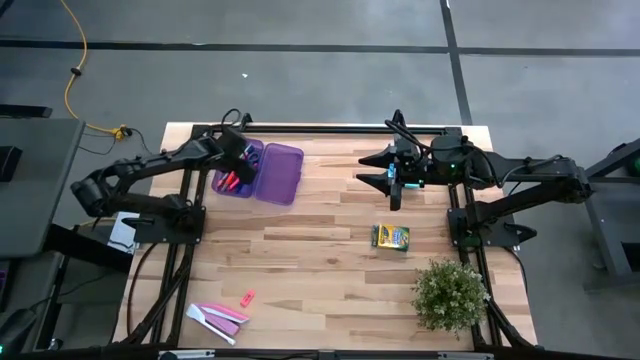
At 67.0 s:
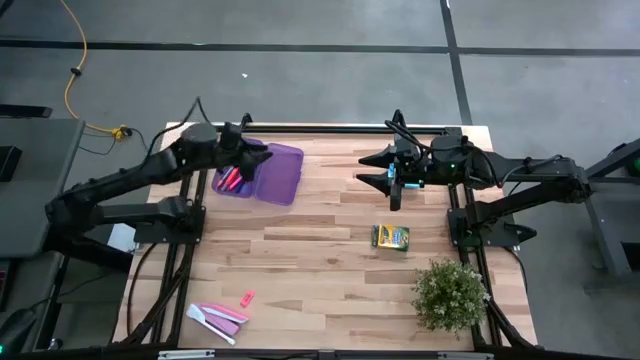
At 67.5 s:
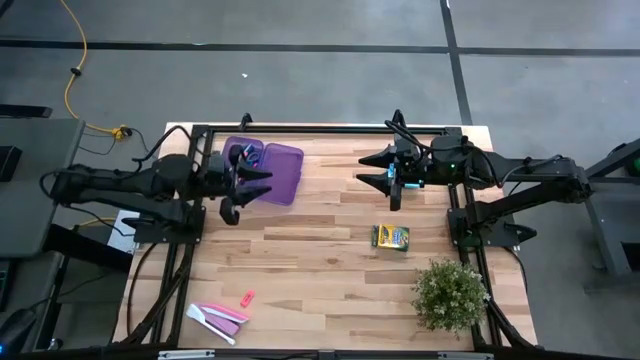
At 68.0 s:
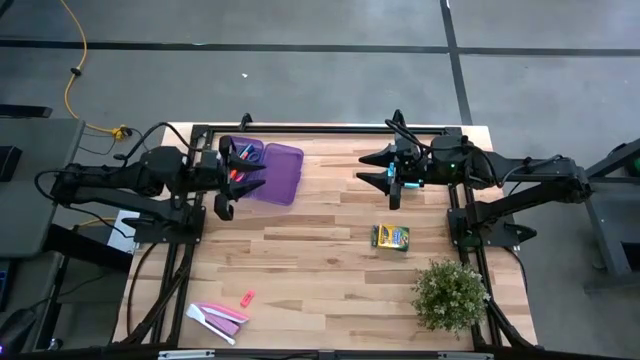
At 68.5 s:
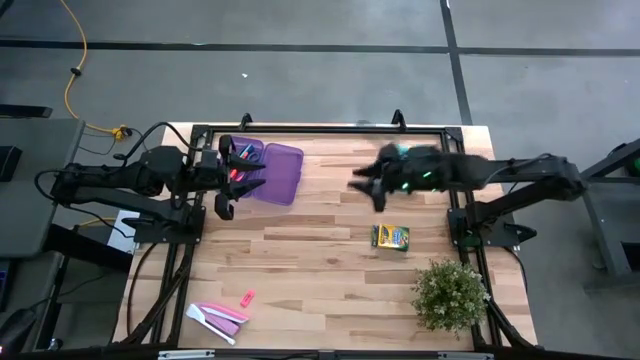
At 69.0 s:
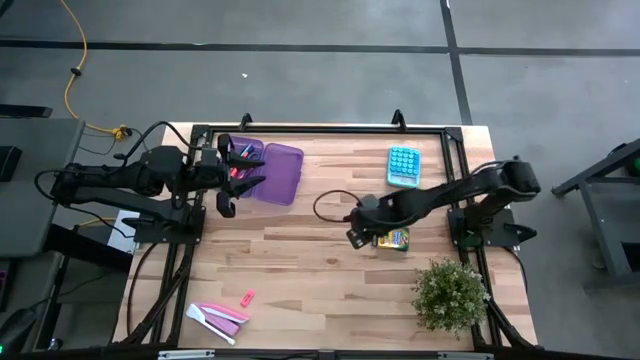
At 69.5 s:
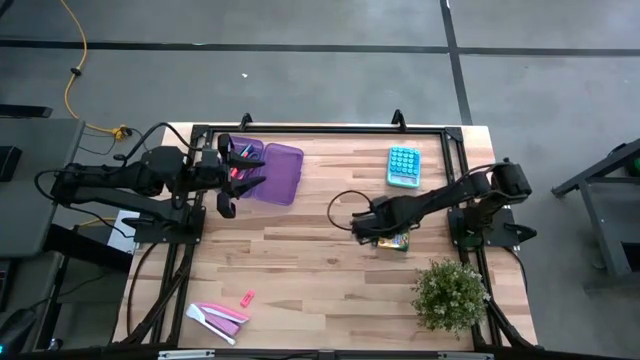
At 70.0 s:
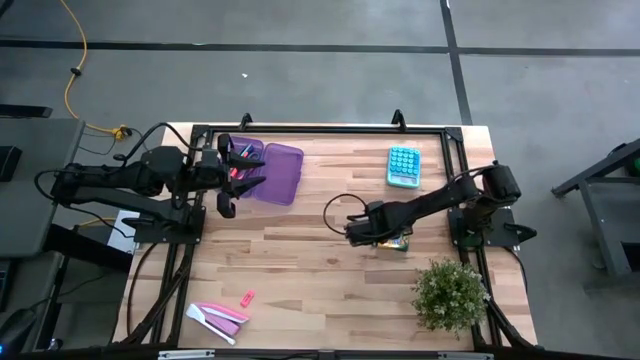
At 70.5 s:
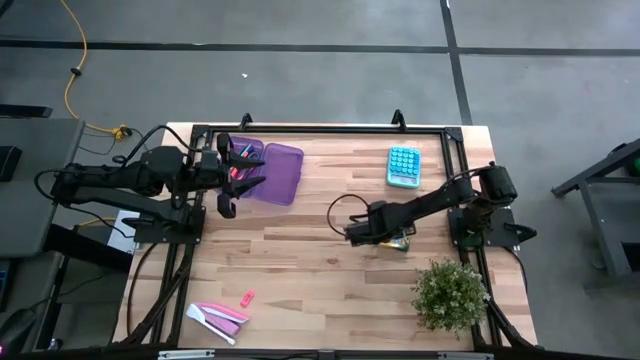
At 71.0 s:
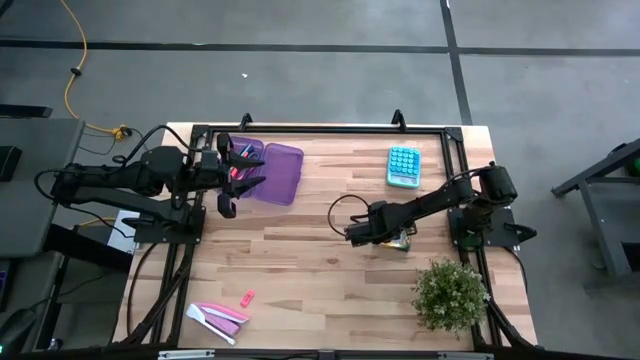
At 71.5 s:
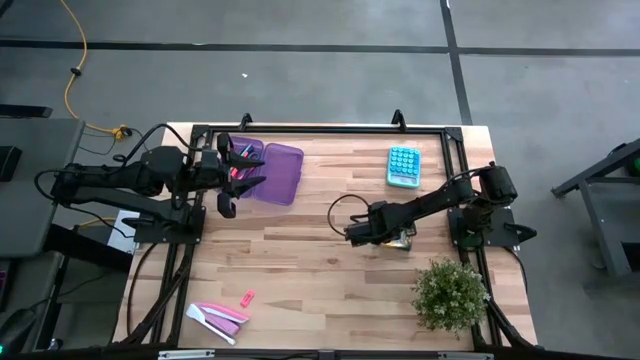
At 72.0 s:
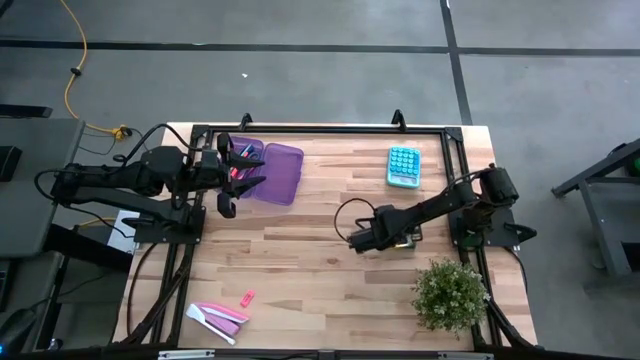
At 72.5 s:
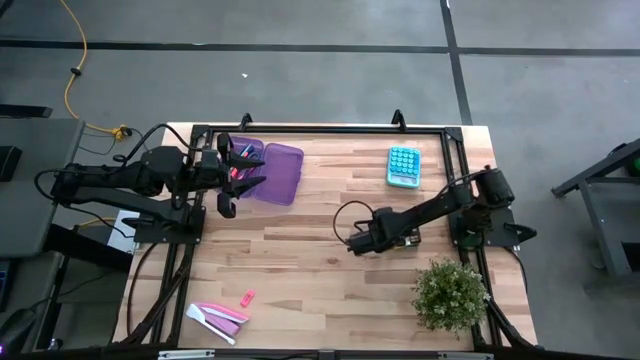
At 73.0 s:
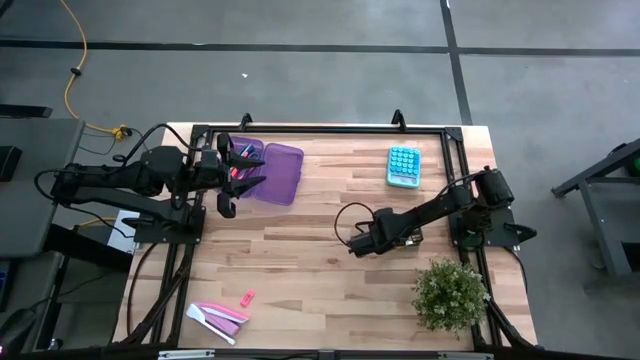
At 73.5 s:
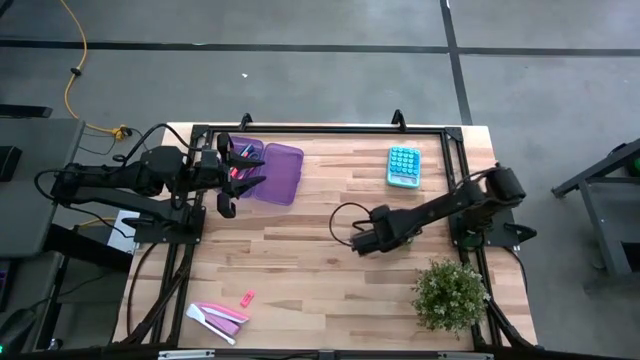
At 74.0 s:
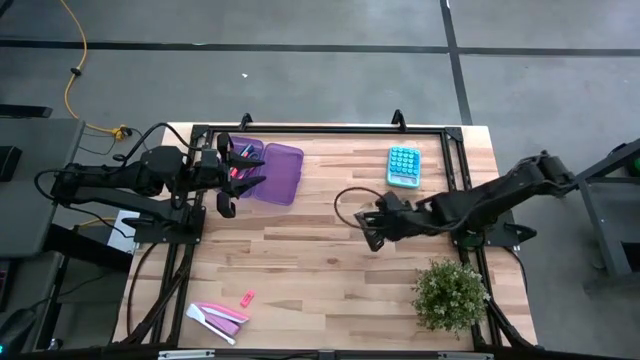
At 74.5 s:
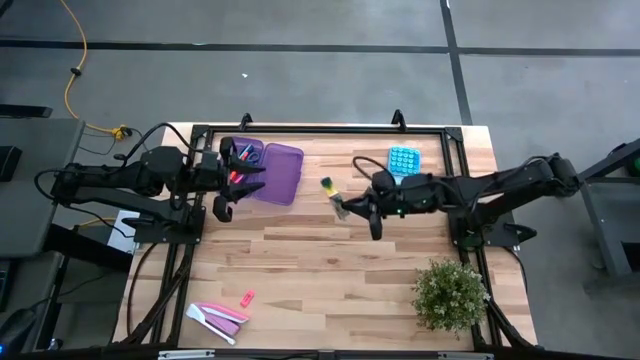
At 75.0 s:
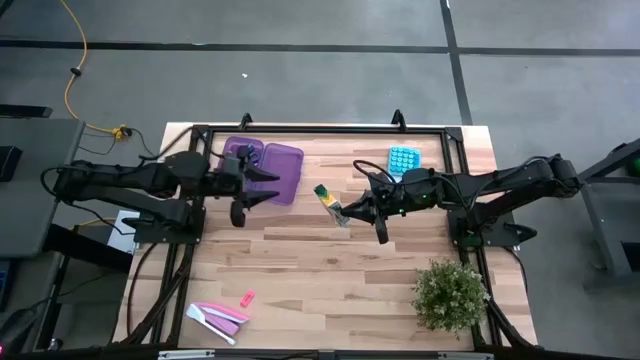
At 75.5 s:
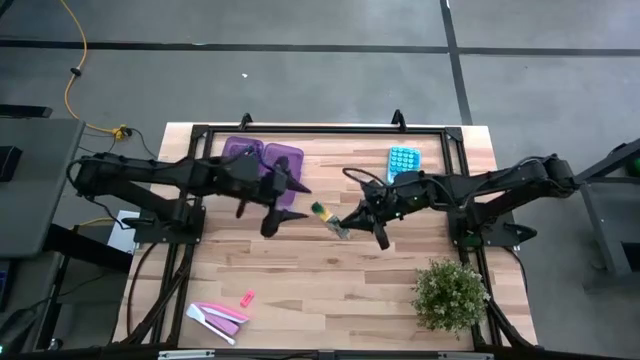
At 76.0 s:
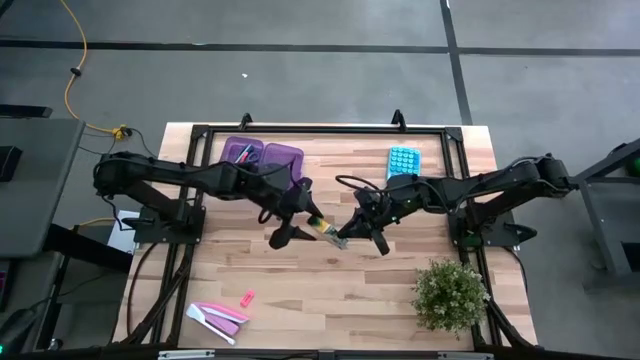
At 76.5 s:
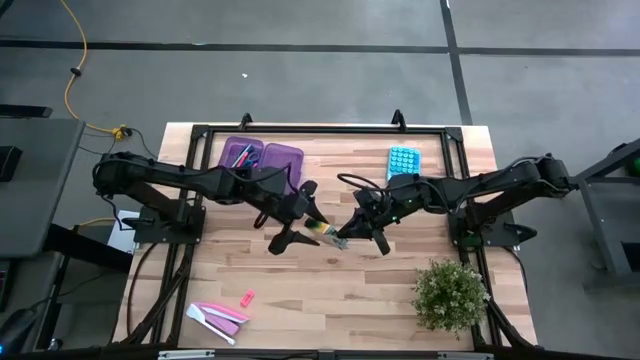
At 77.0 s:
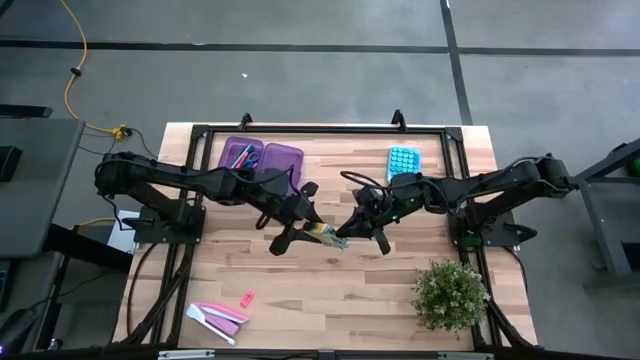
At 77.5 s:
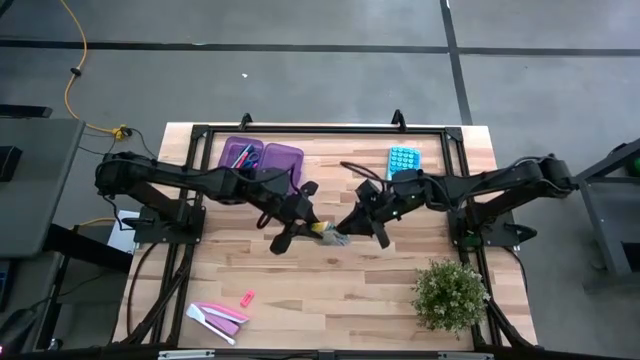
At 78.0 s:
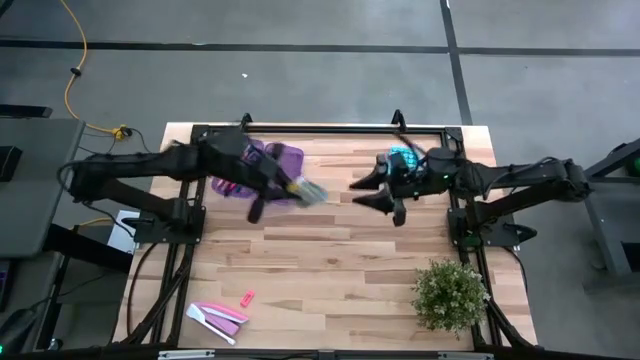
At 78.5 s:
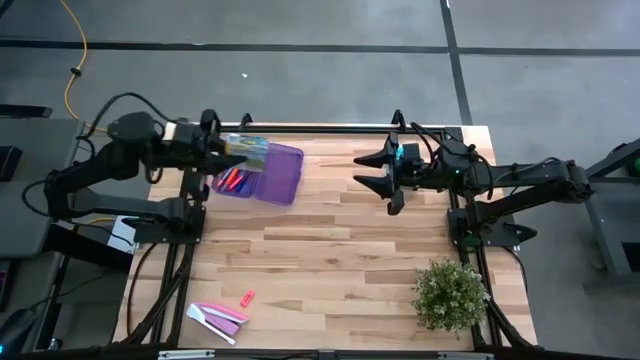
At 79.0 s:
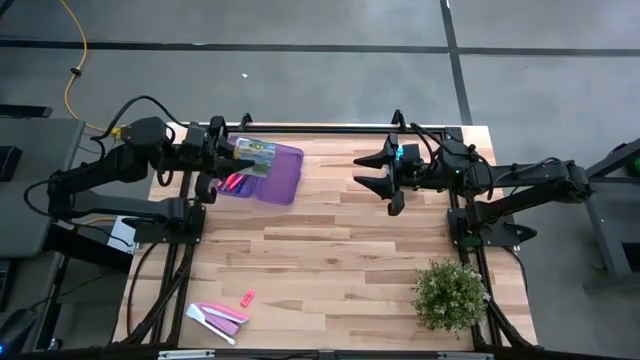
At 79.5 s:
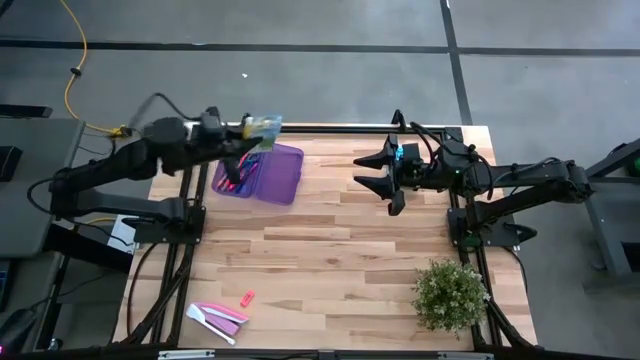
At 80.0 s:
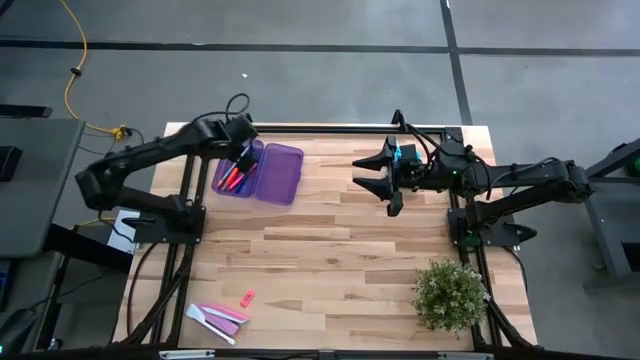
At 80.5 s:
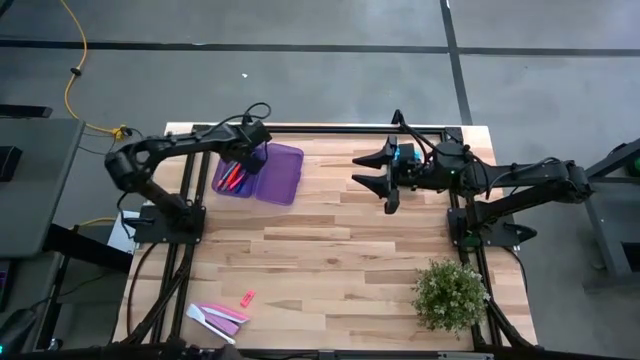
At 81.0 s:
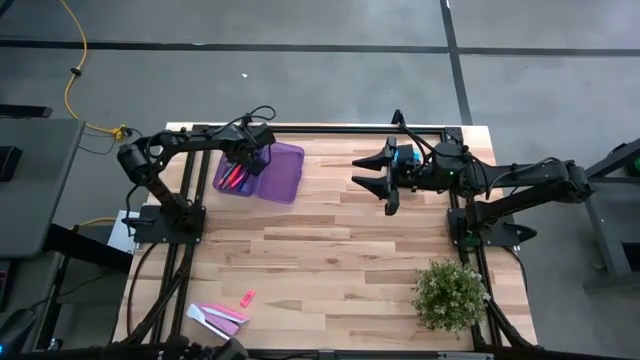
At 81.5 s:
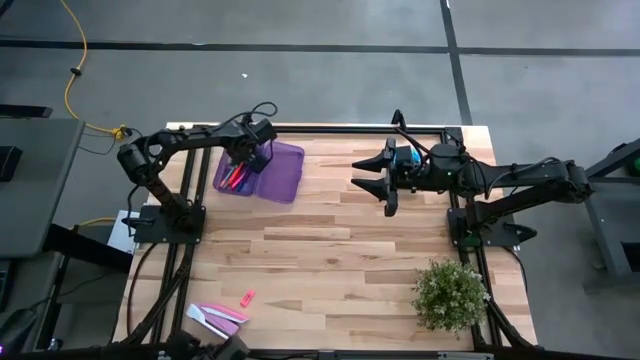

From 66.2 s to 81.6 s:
Task: Pack school essentials
Put the yellow box of crayons into the purple supply box

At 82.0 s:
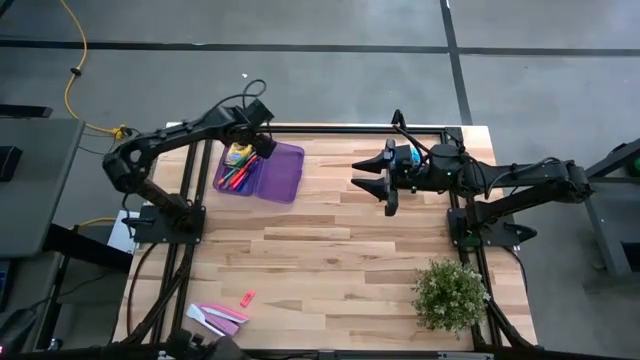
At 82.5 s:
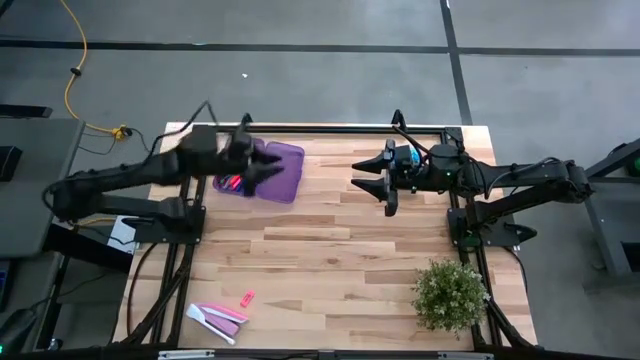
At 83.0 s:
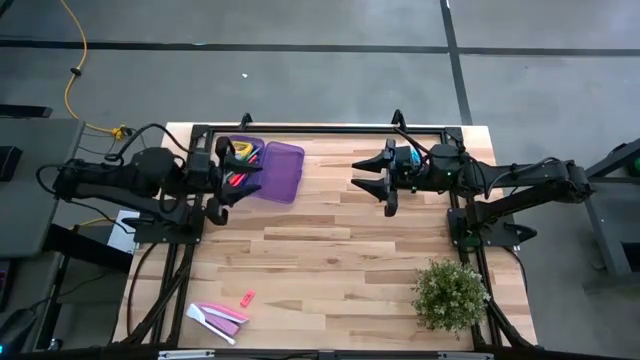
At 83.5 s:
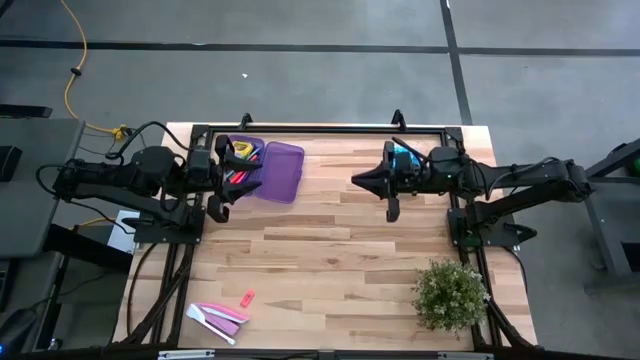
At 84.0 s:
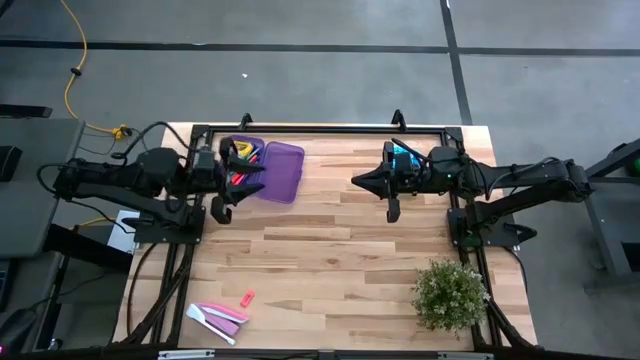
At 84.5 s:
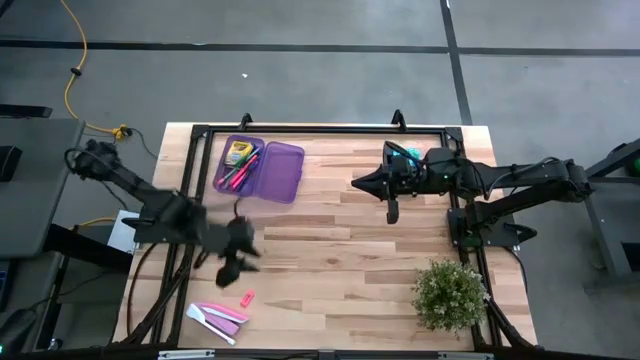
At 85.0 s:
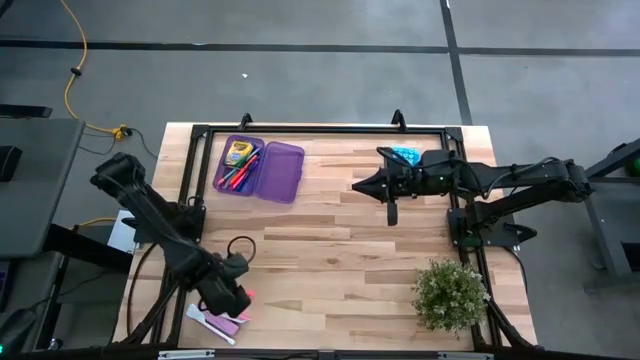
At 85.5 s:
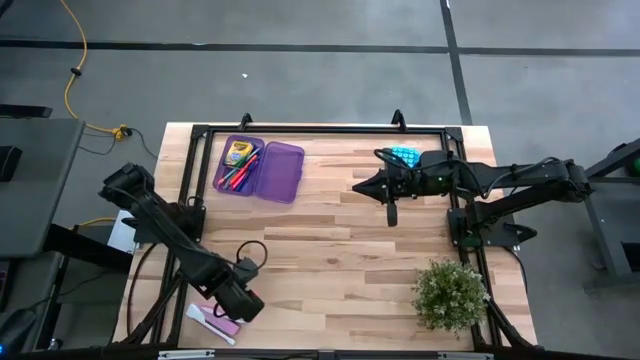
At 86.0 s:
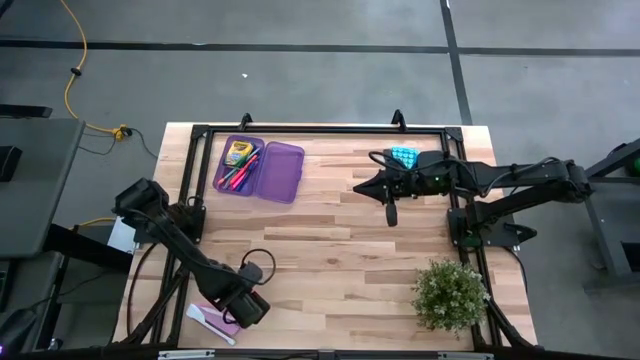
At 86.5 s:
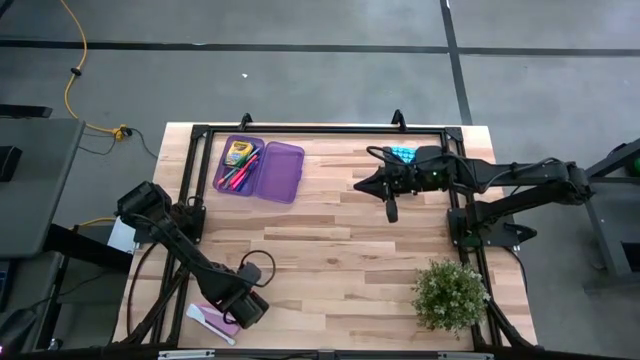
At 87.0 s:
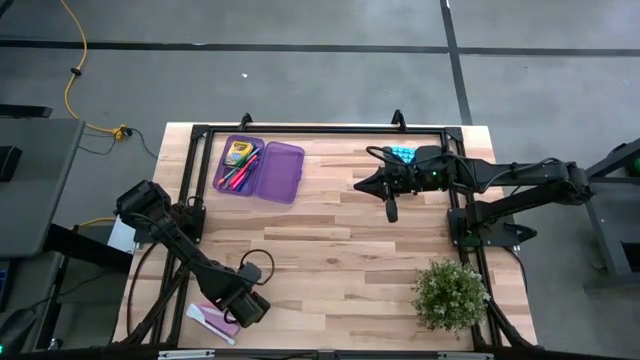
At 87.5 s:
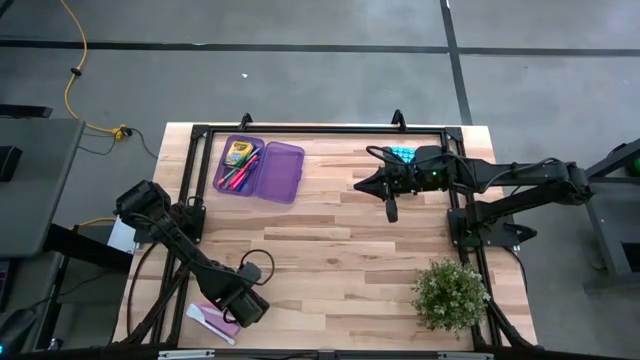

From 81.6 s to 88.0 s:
Put the pink eraser into the purple supply box
